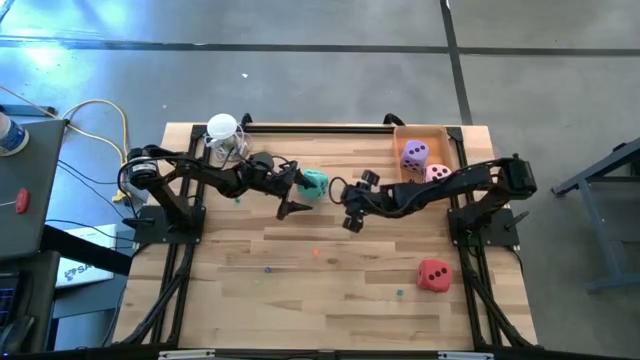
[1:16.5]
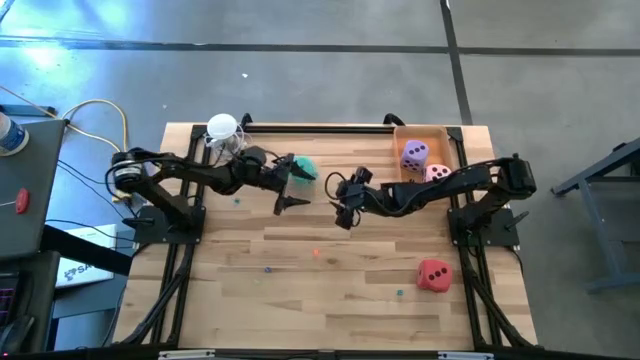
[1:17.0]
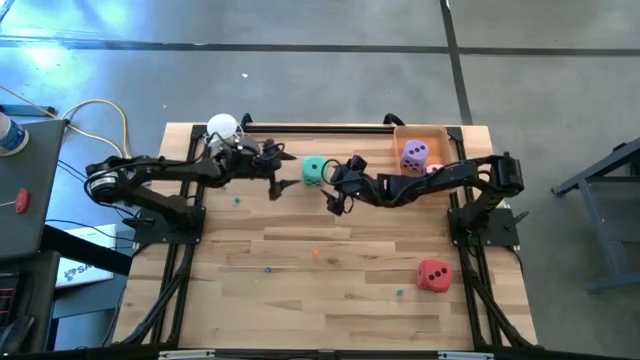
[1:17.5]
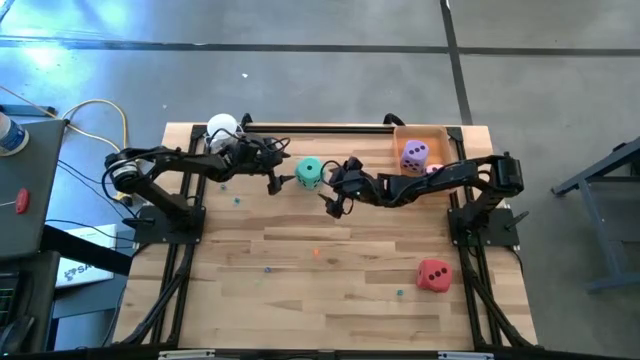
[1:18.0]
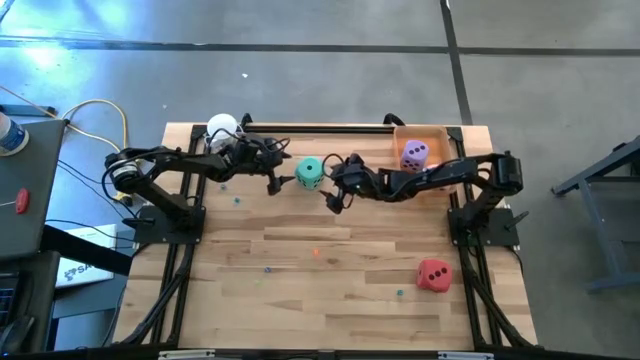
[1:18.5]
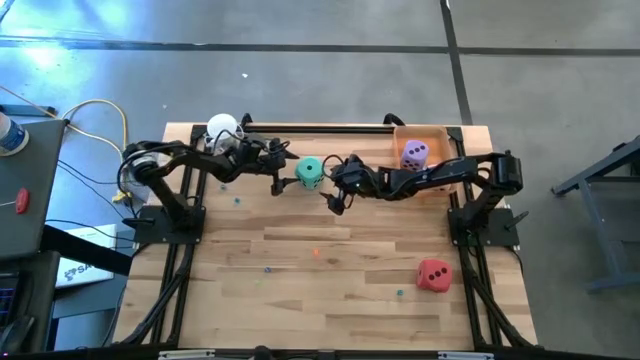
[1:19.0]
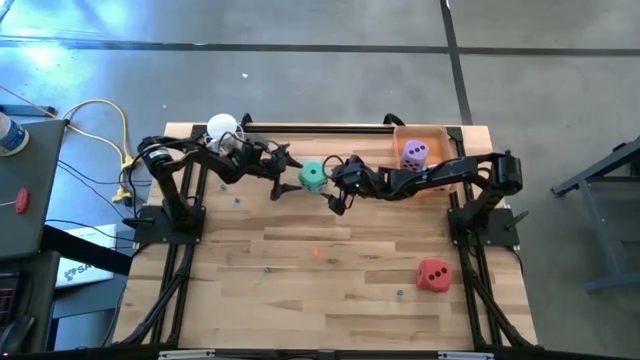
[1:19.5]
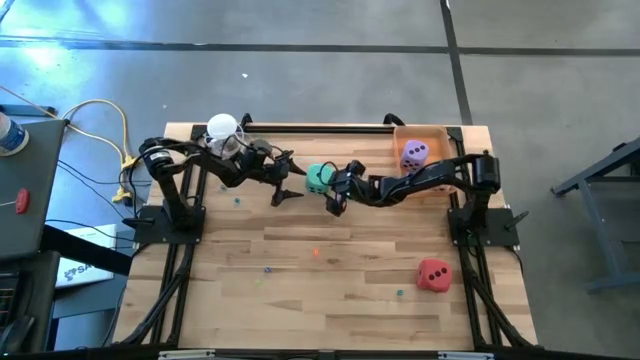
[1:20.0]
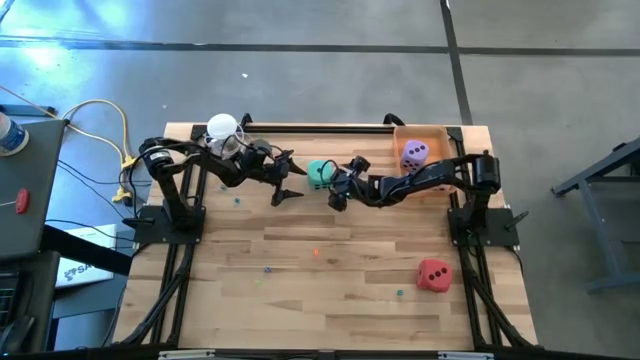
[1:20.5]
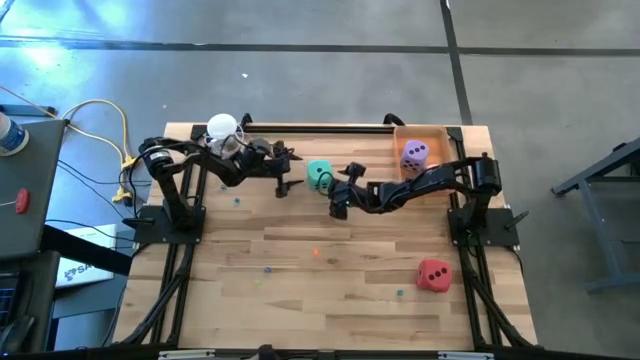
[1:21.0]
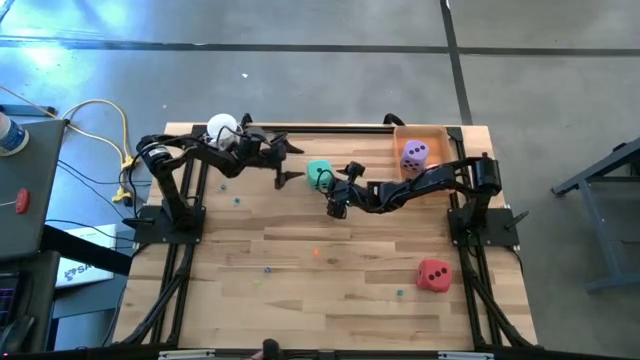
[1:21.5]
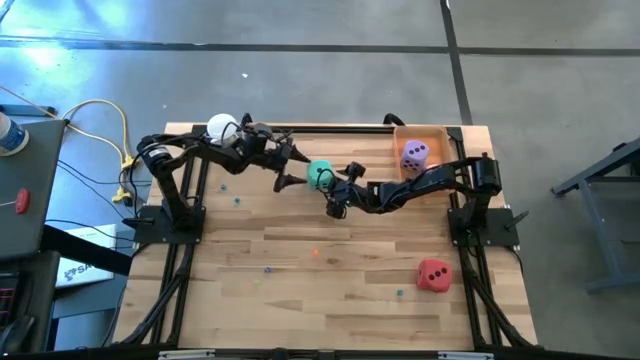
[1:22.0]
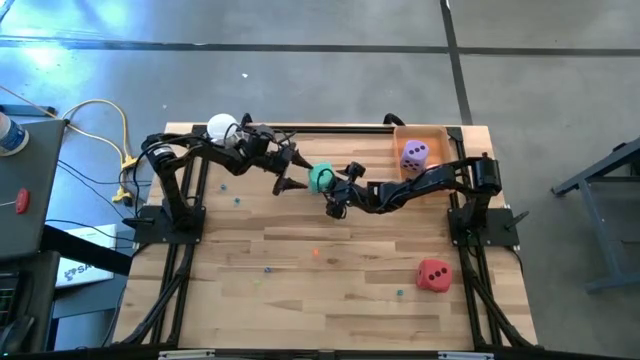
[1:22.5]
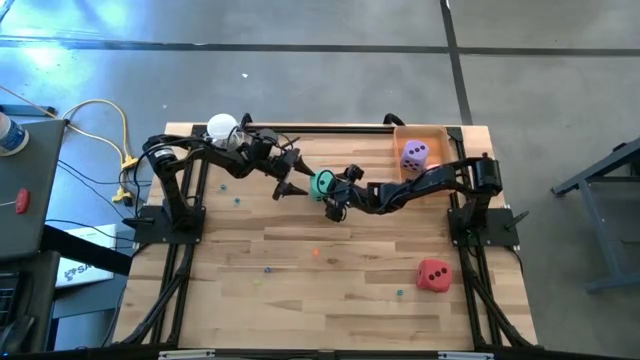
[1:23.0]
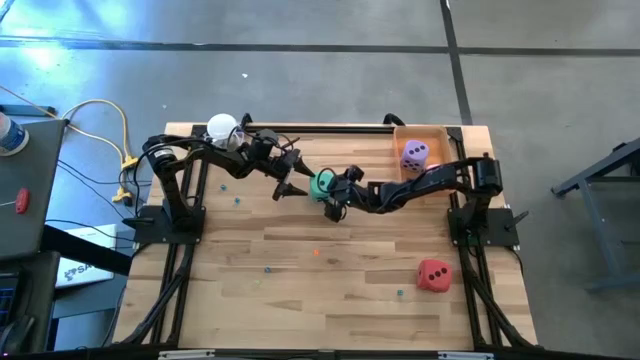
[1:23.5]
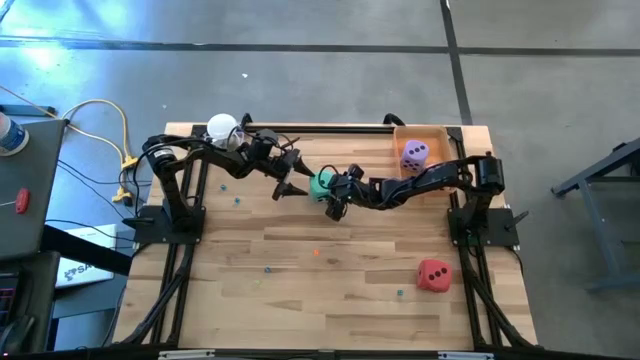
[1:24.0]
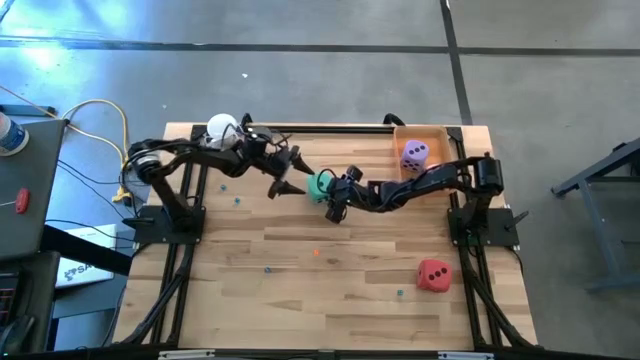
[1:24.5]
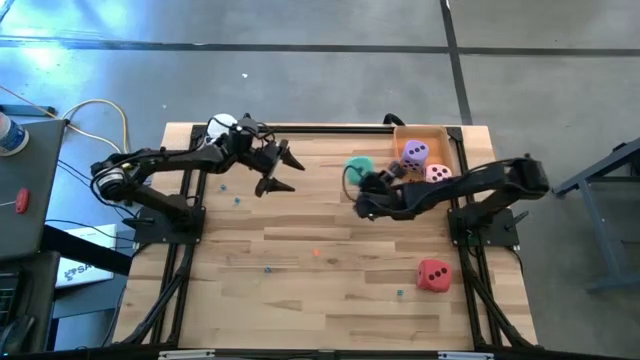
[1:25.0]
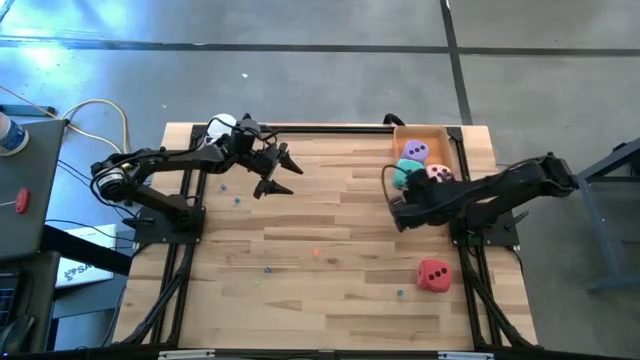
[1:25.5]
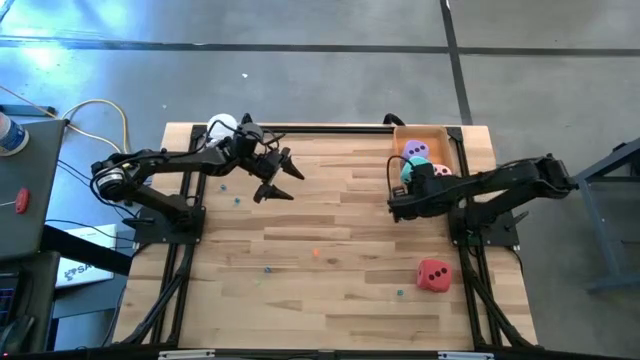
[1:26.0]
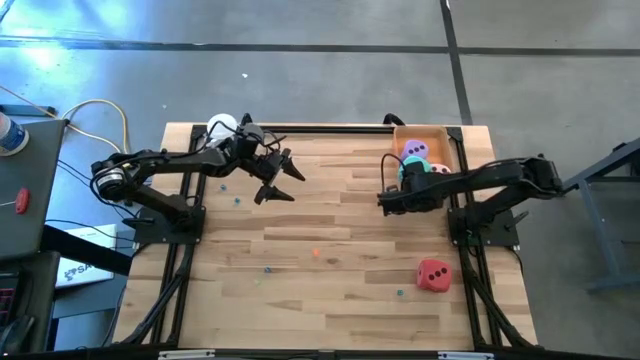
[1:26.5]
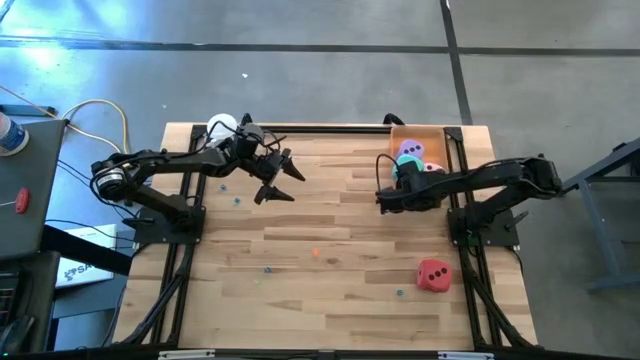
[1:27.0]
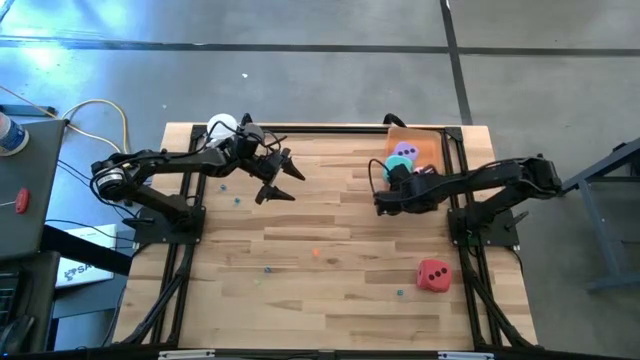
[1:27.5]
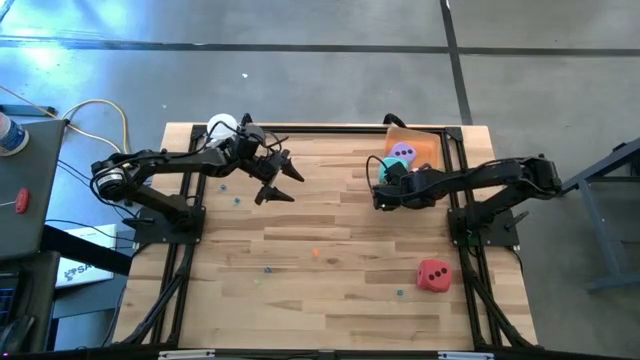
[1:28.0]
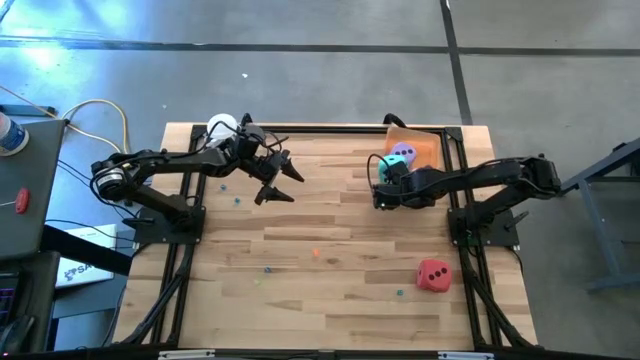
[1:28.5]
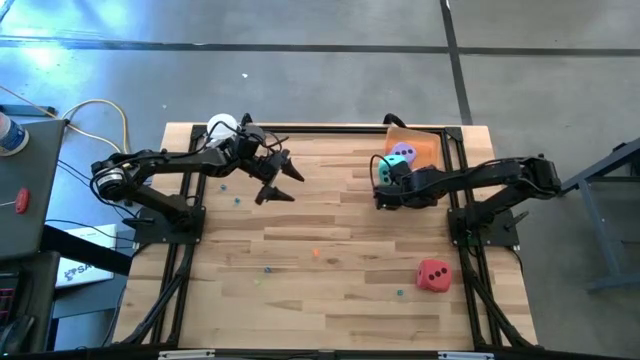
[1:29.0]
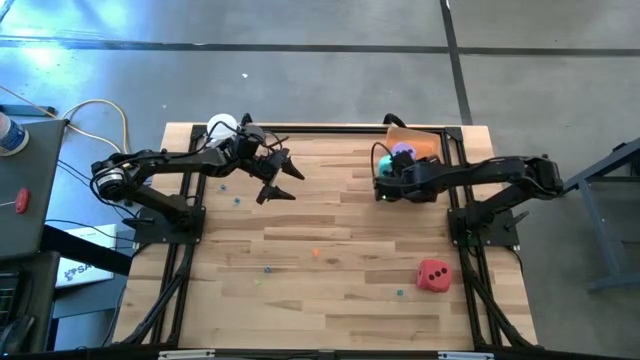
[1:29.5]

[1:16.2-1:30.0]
Task: Pick & Place Dice
Put the green large die into the orange bin

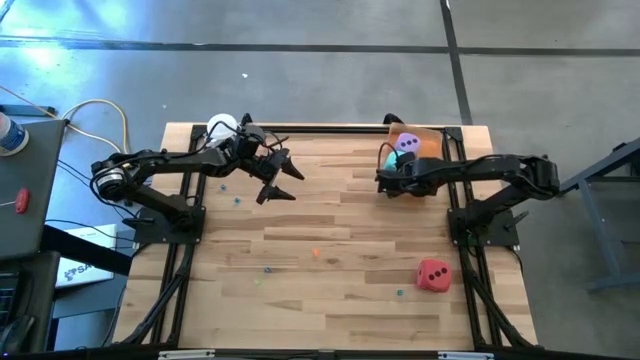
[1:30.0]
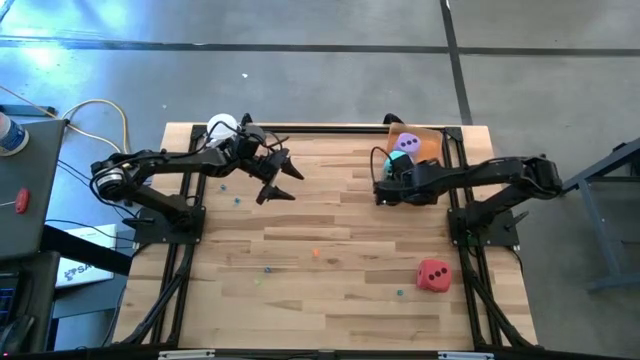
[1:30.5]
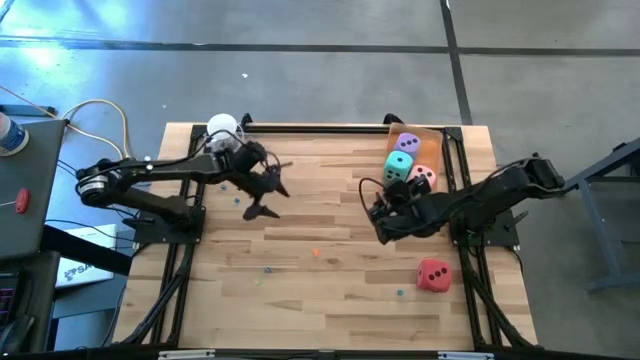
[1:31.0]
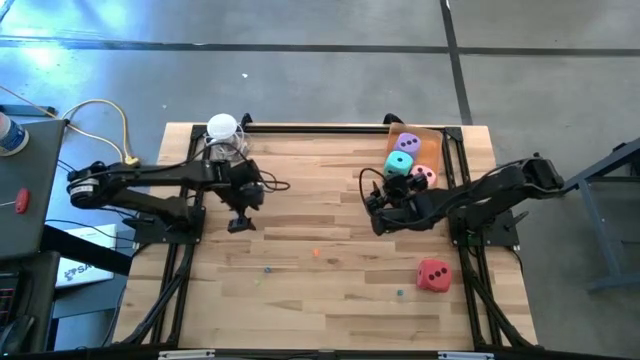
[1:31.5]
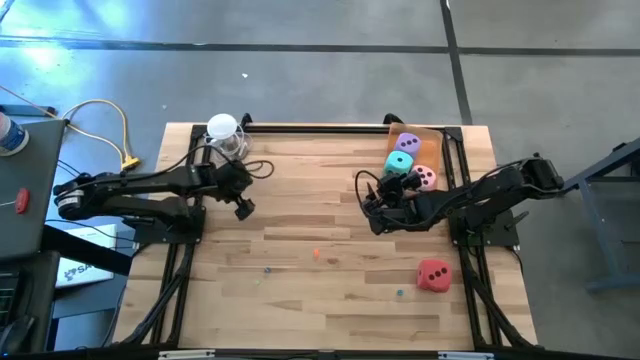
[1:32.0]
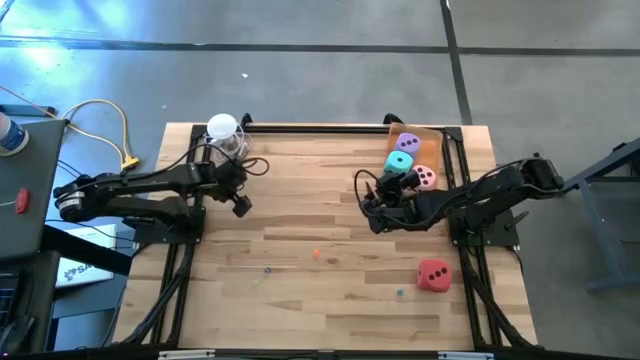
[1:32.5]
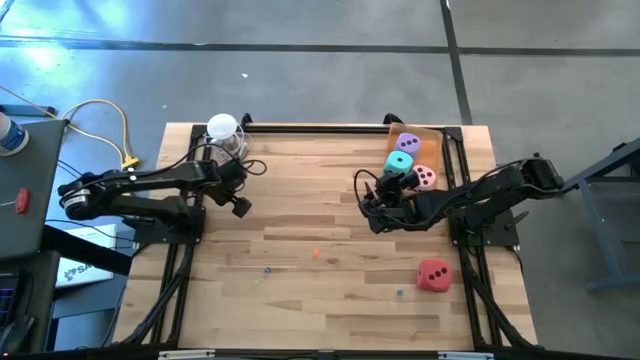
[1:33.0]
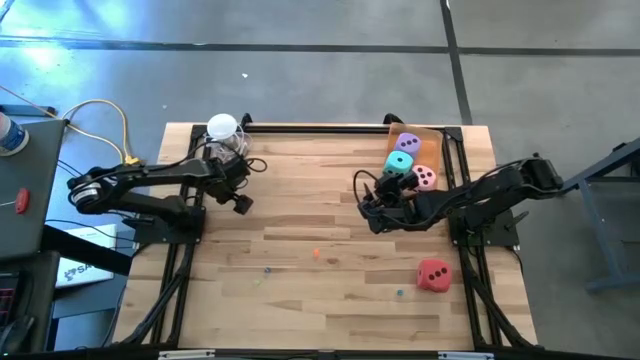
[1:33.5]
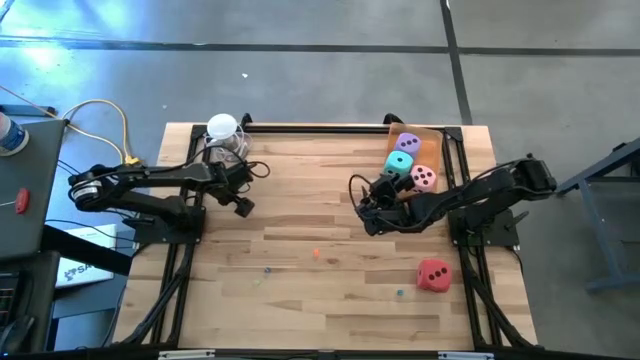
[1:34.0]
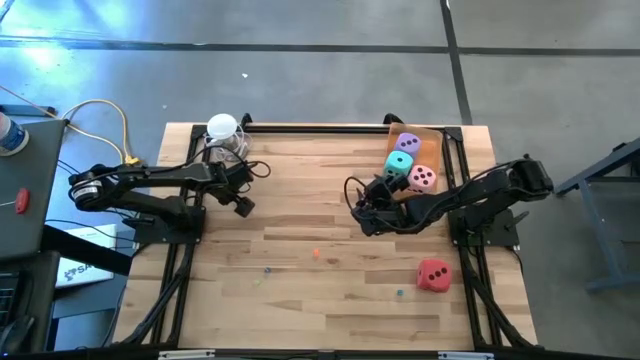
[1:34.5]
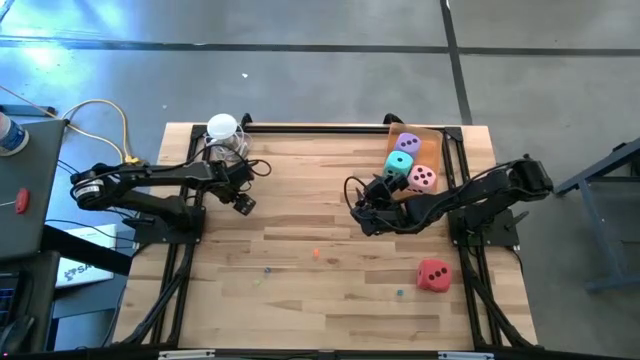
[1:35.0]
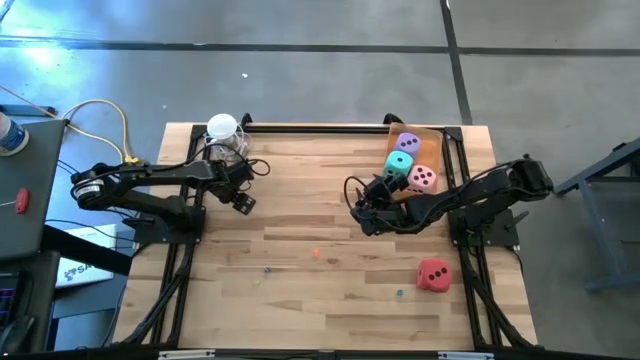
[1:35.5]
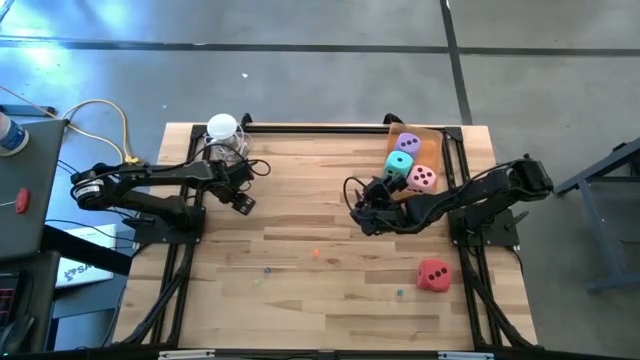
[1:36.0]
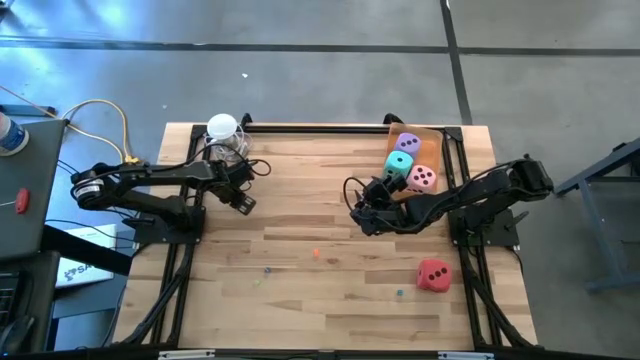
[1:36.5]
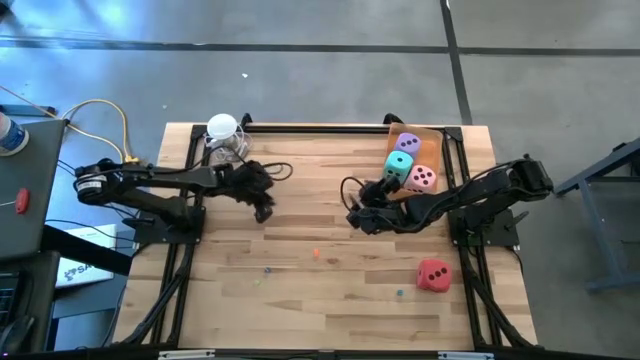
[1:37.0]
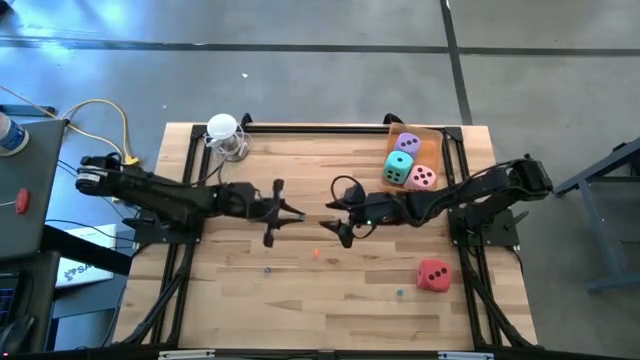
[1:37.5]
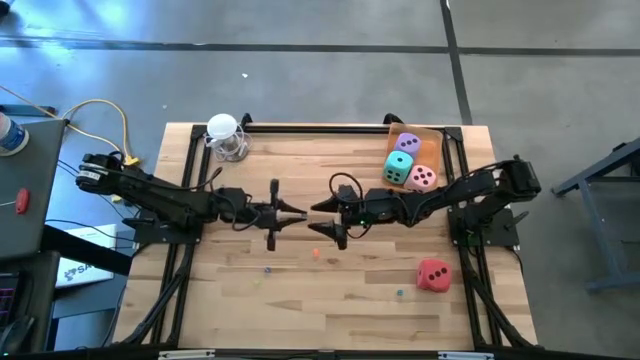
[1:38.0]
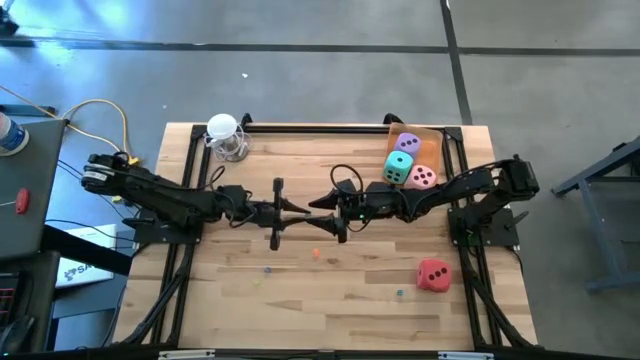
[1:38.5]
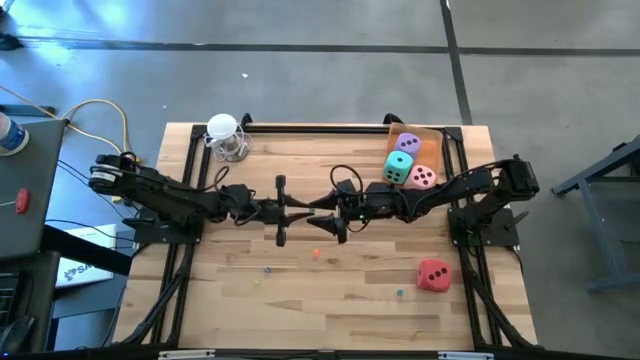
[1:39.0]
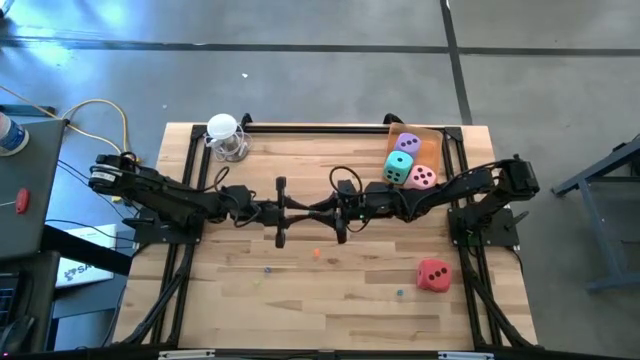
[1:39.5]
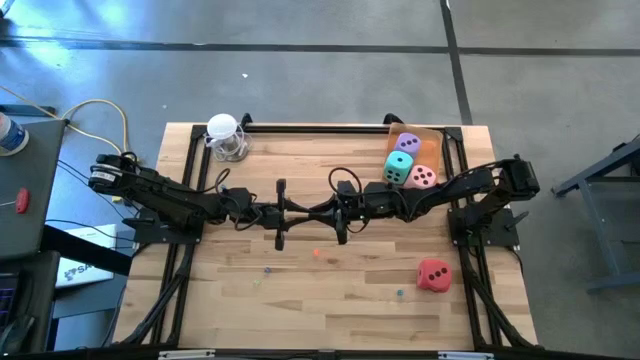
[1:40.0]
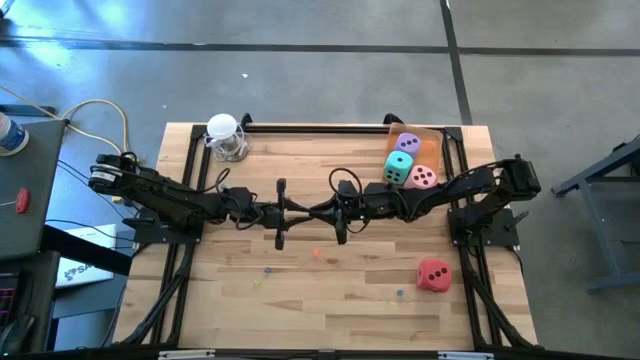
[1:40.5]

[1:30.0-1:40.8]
Put the light blue small die into the orange bin
